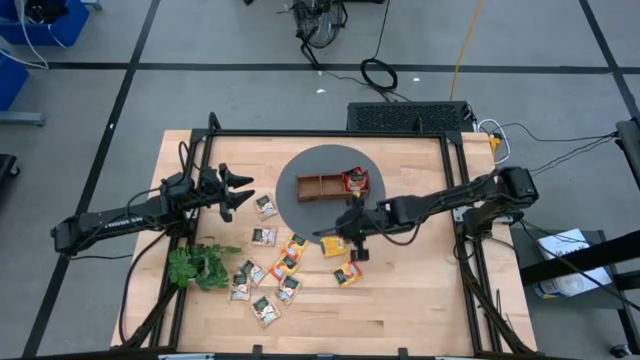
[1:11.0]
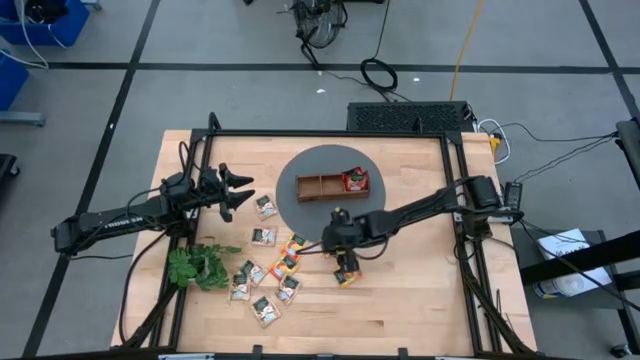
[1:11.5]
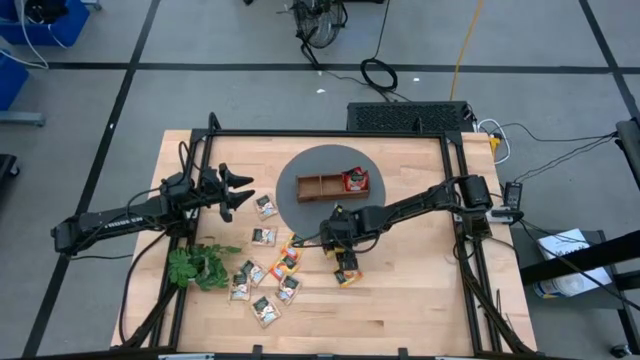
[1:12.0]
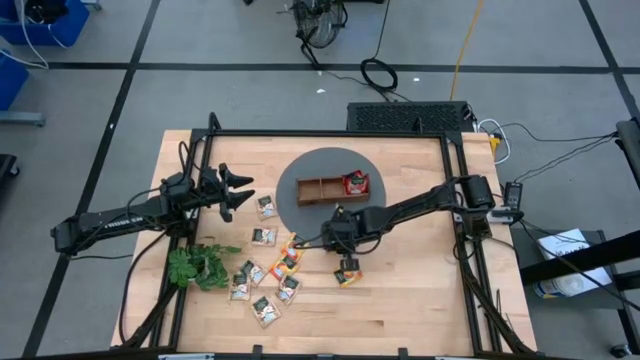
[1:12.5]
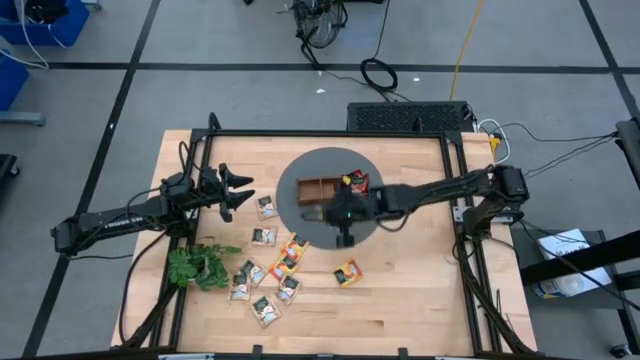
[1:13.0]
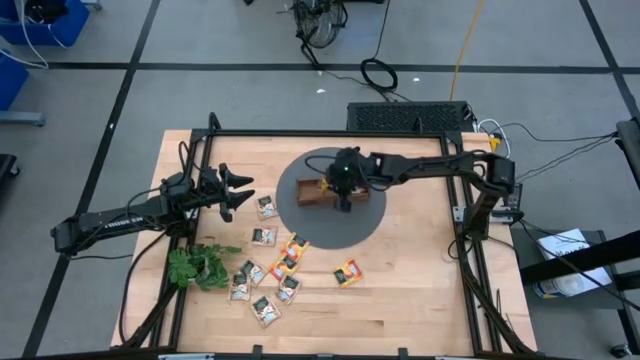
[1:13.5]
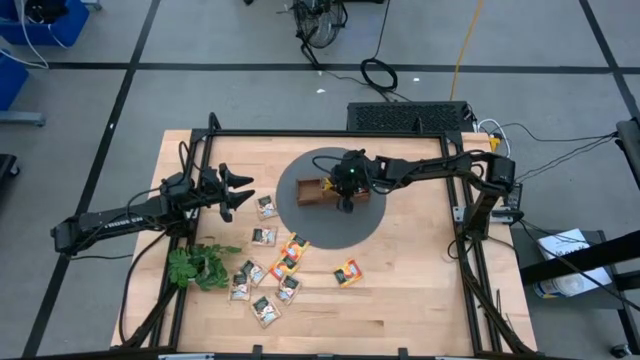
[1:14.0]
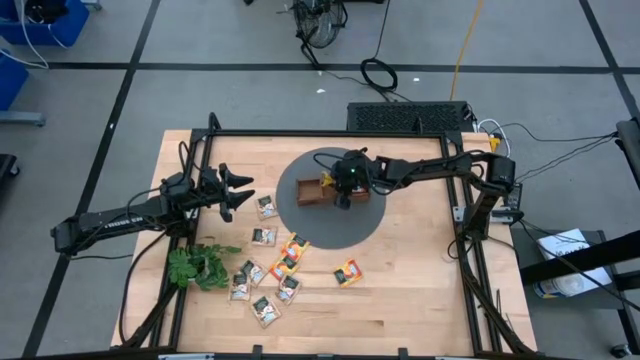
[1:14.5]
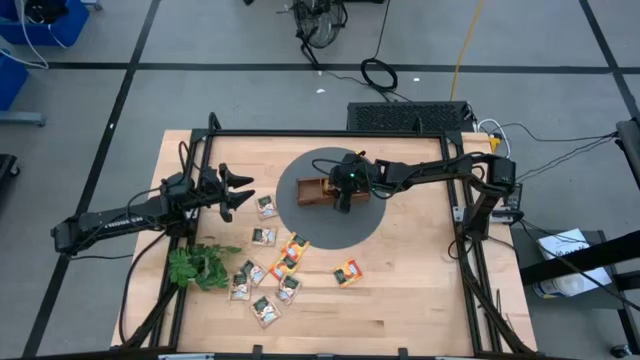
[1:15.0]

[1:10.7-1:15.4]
Task: Pick & Place Tea
Put the yellow tea bag into the middle section of the wooden organizer

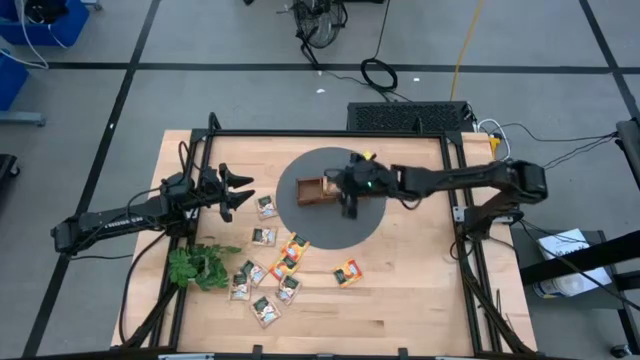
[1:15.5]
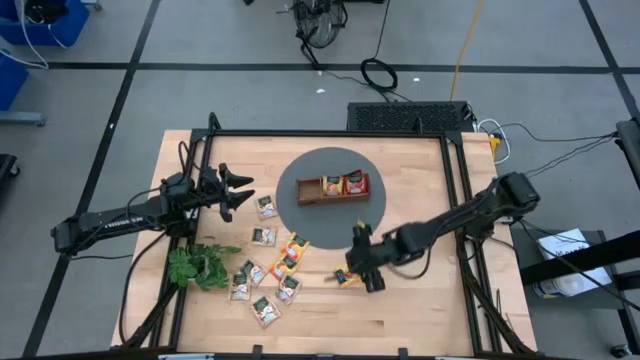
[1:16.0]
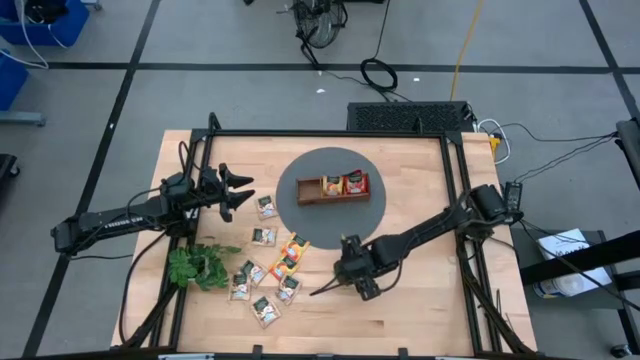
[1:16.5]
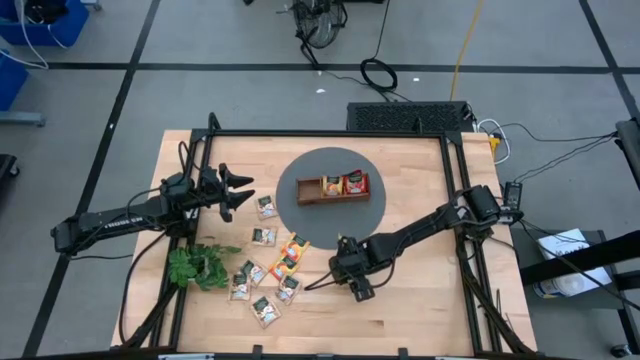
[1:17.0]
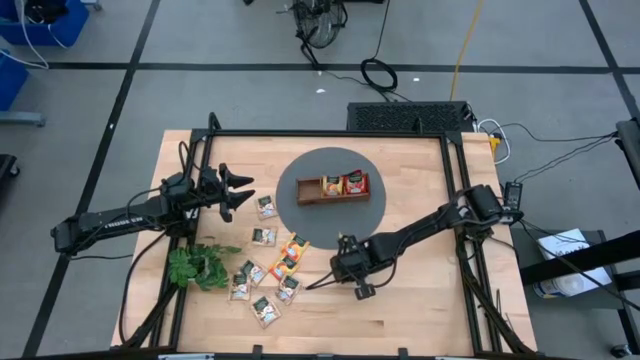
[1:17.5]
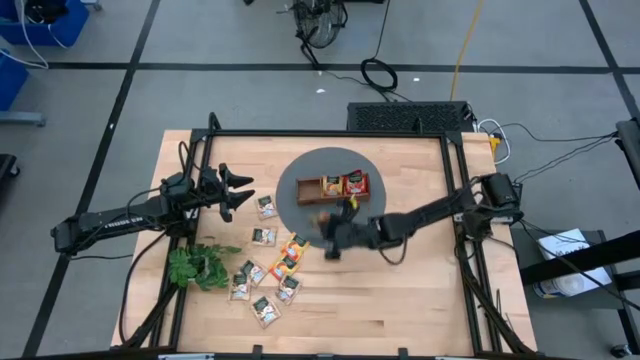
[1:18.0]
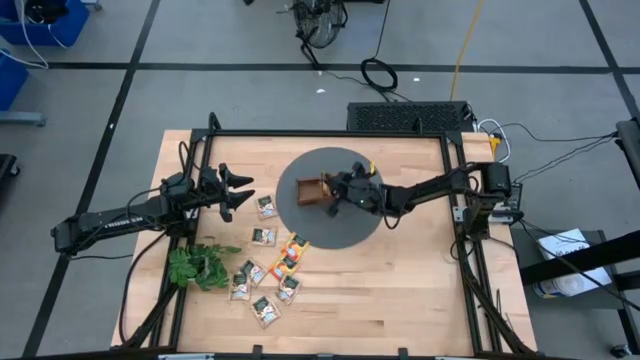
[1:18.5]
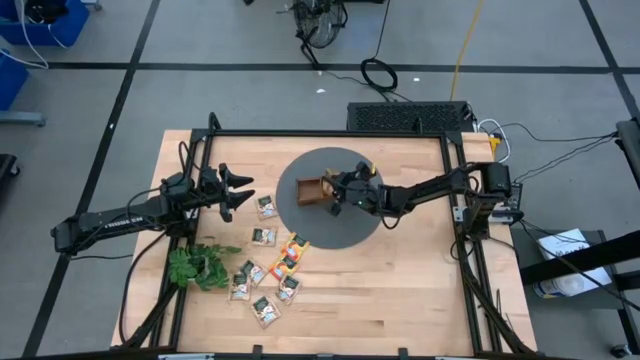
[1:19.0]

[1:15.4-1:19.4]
Put the yellow tea bag into the middle section of the wooden organizer

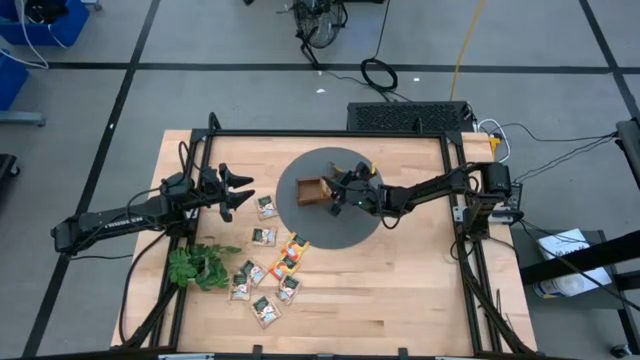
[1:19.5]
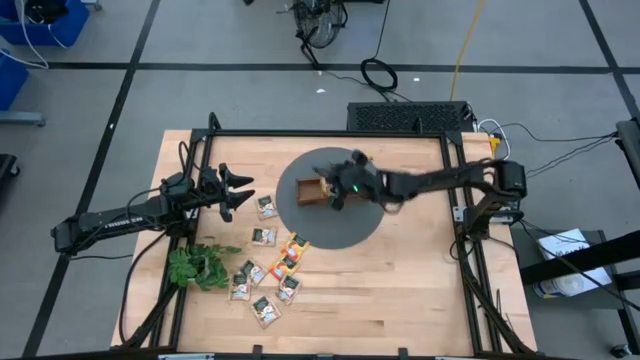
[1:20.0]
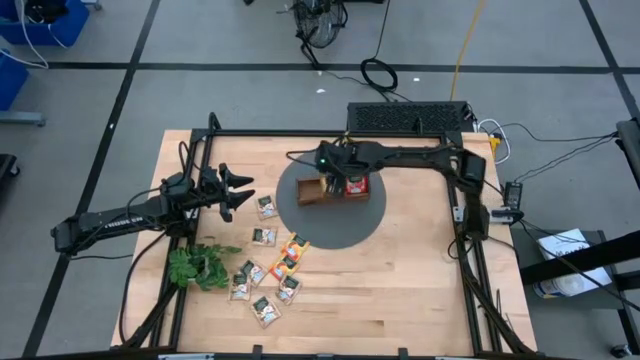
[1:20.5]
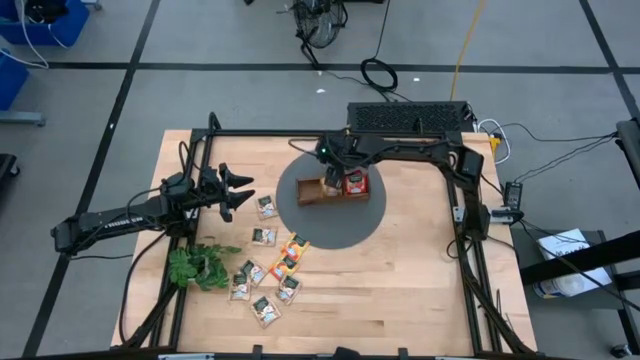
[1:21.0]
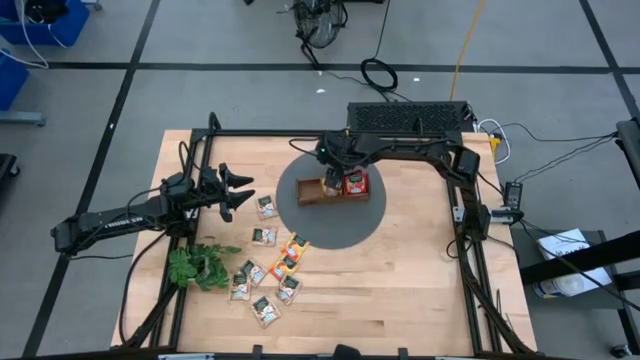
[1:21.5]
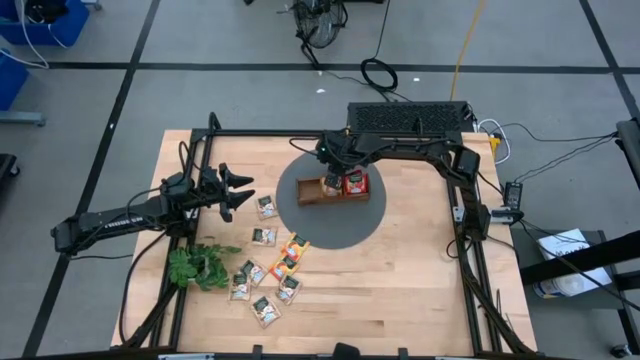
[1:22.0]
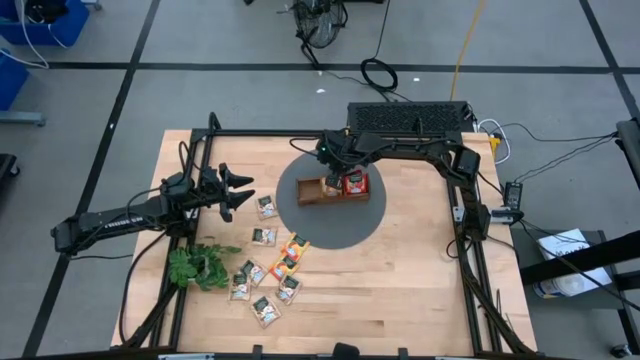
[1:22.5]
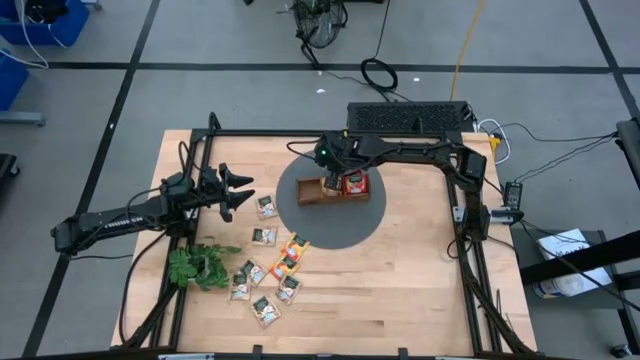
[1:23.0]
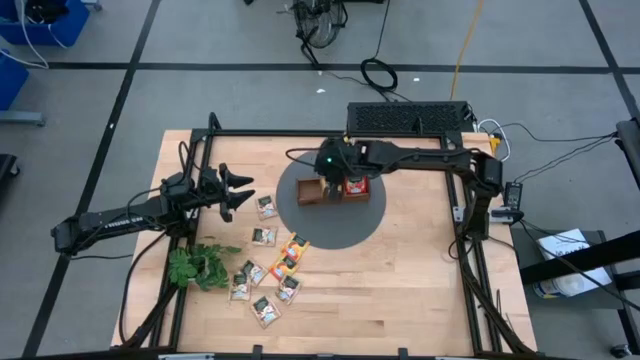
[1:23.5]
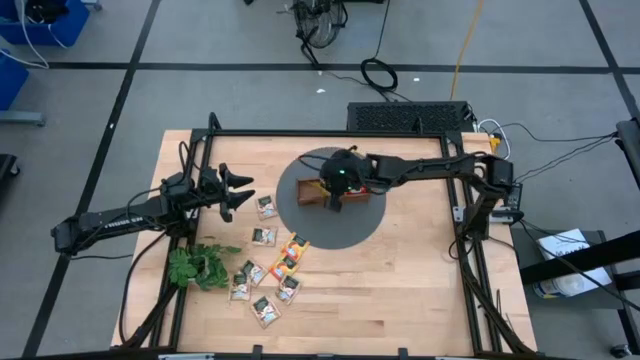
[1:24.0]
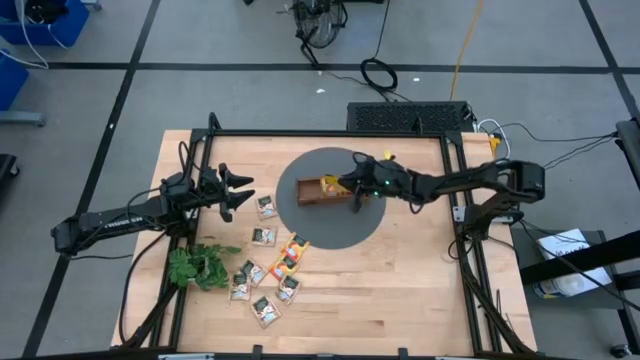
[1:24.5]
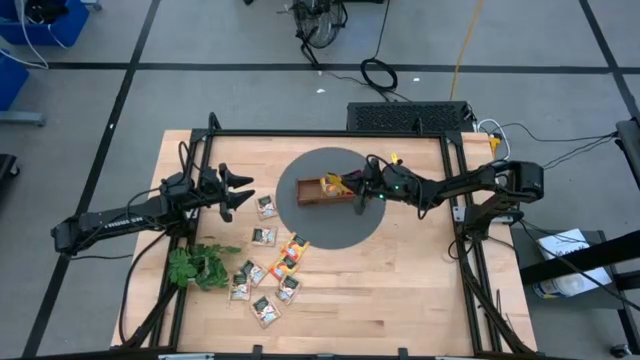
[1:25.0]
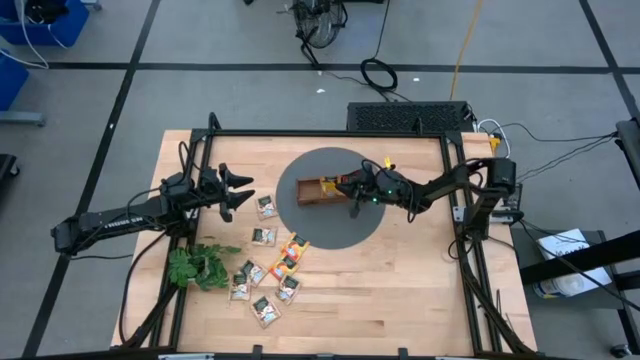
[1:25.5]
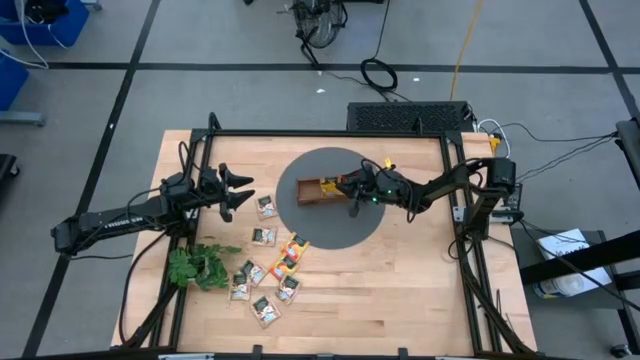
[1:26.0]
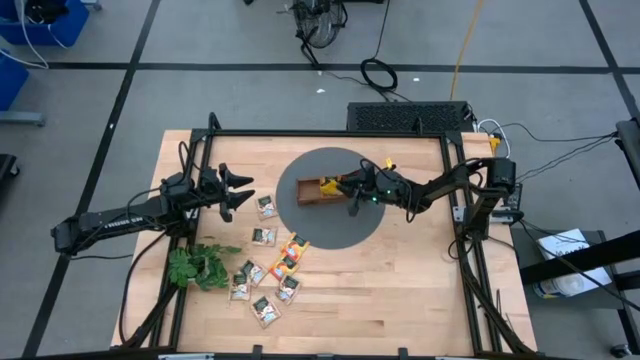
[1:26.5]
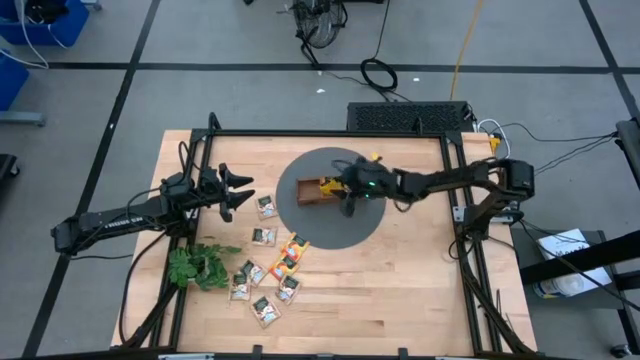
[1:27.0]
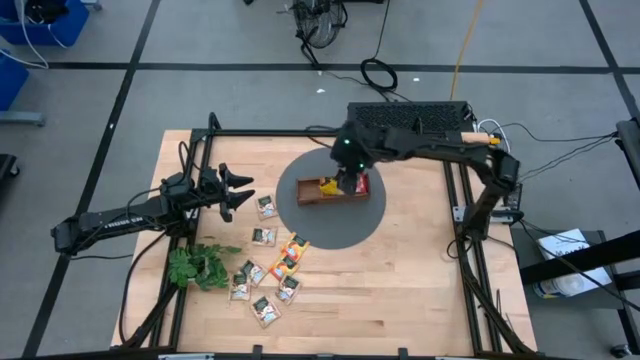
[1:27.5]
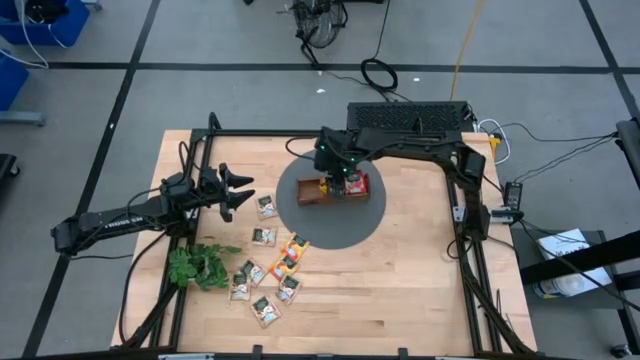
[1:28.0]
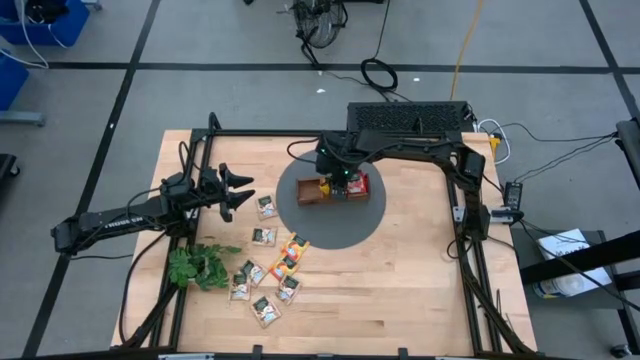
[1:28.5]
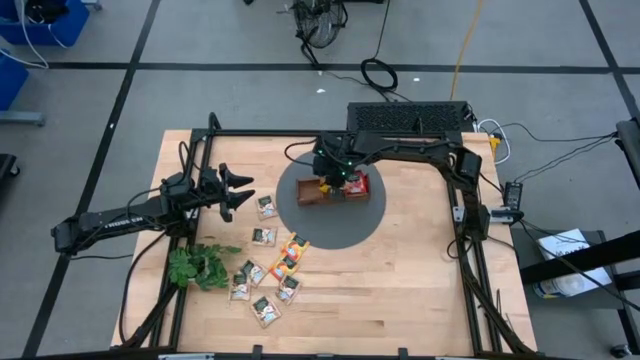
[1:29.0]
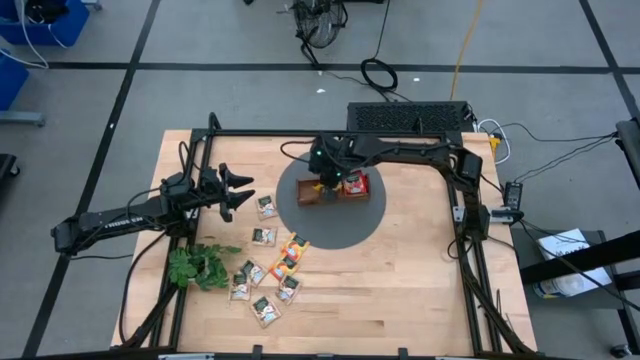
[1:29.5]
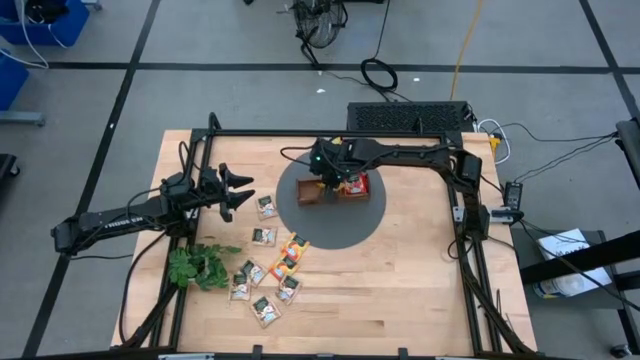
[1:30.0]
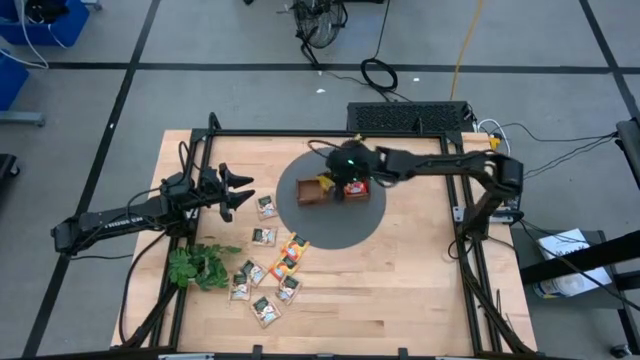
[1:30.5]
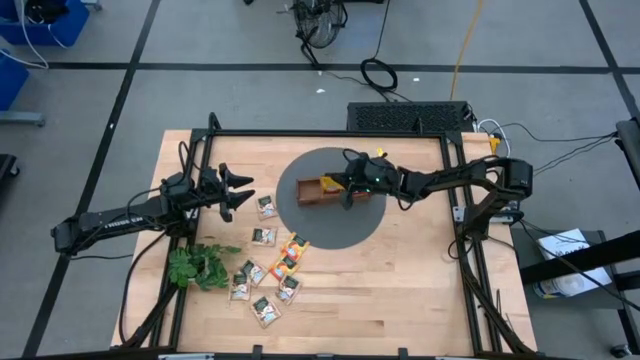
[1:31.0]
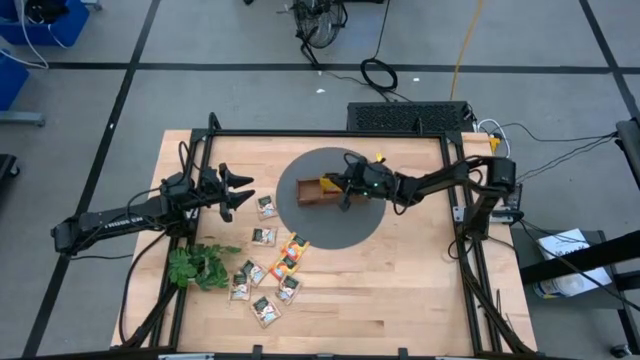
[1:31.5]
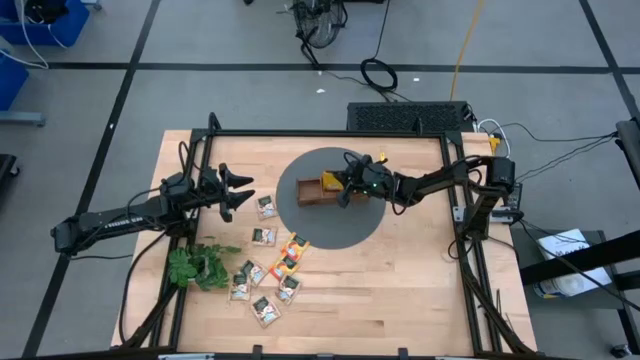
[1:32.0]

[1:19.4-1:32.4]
Put the yellow tea bag into the middle section of the wooden organizer
